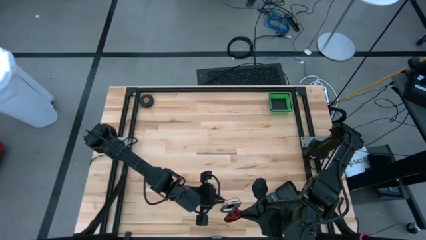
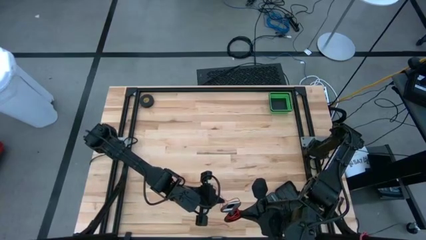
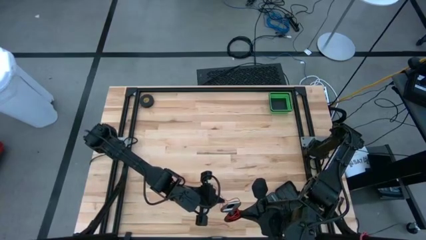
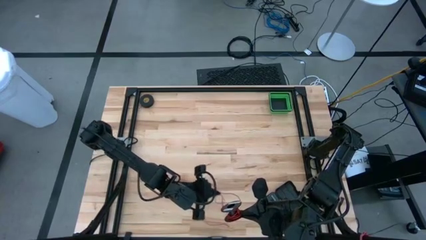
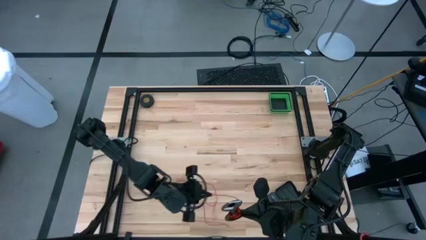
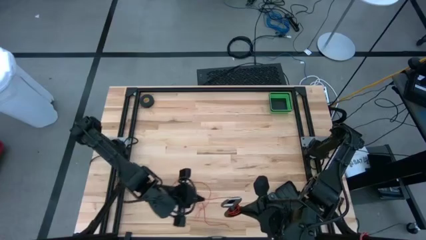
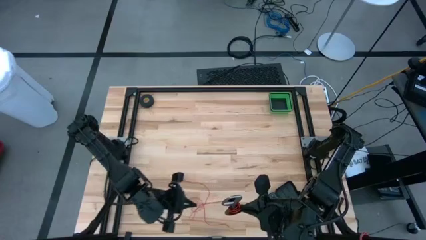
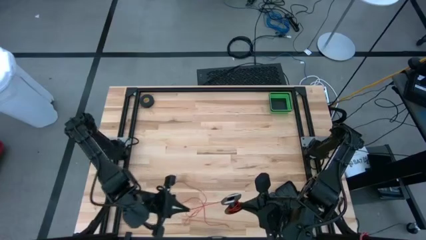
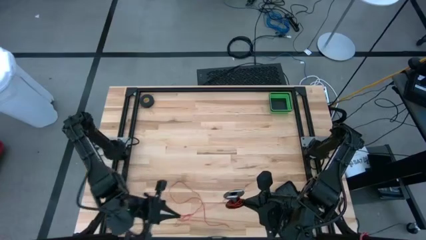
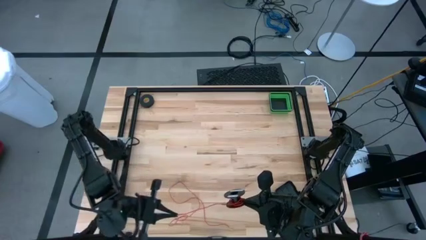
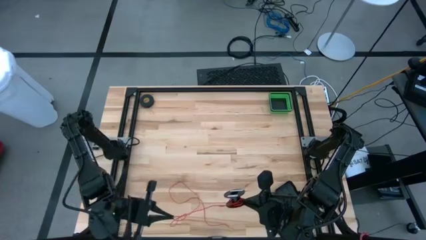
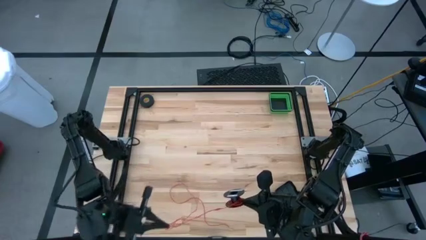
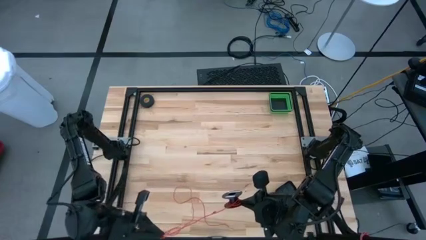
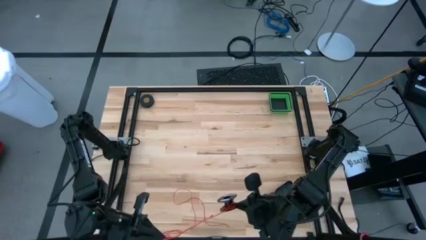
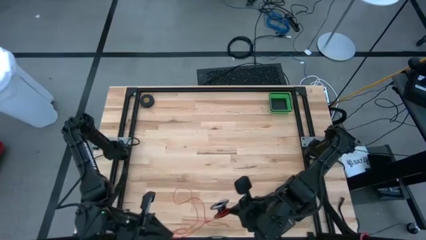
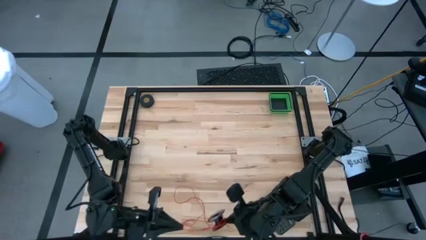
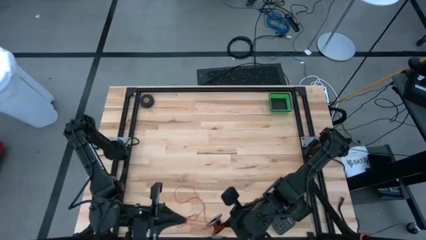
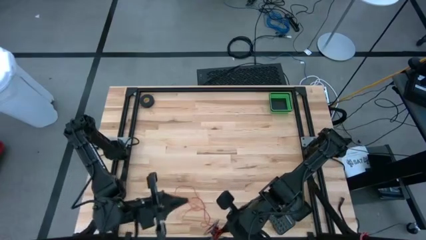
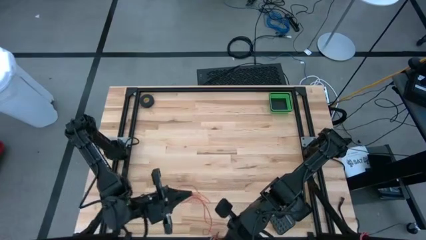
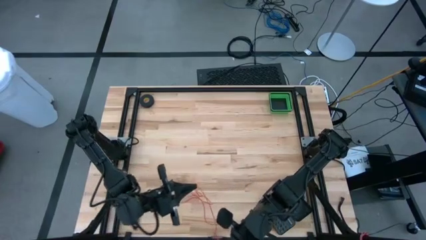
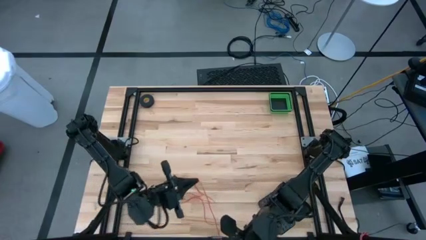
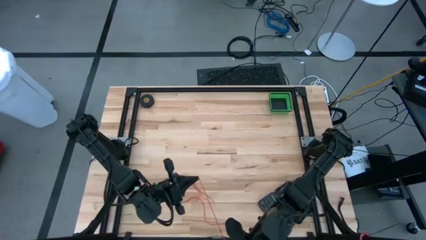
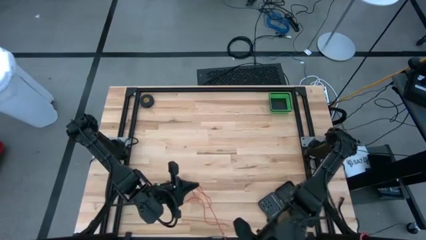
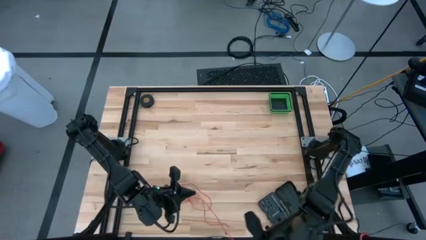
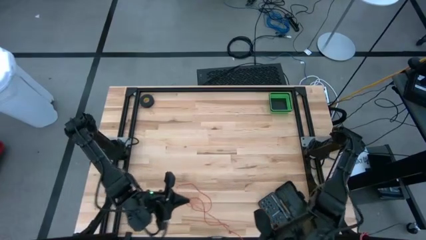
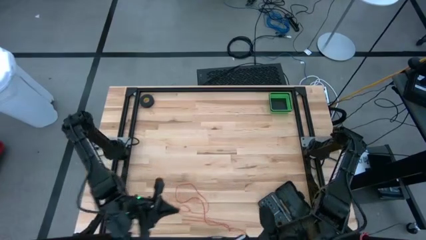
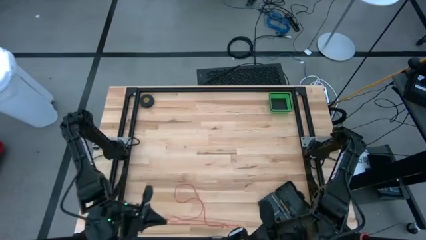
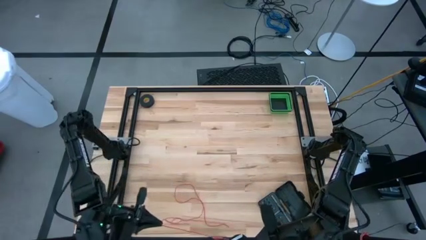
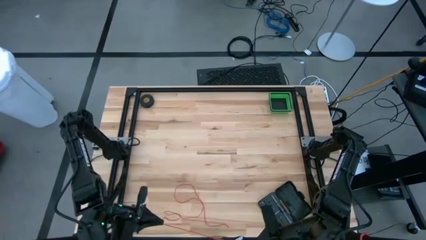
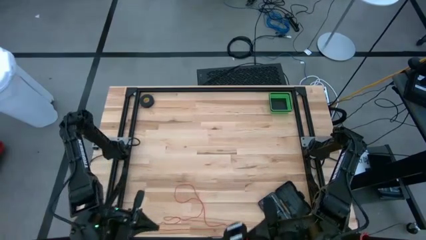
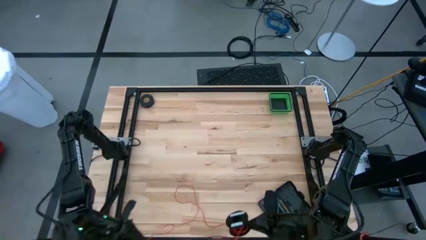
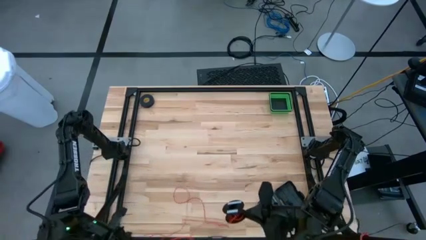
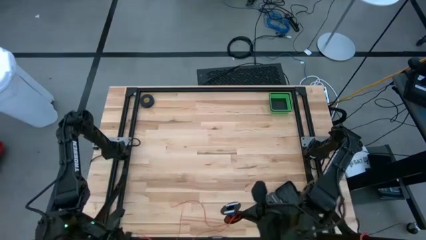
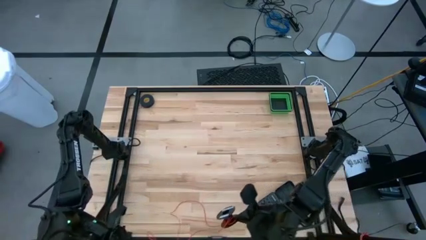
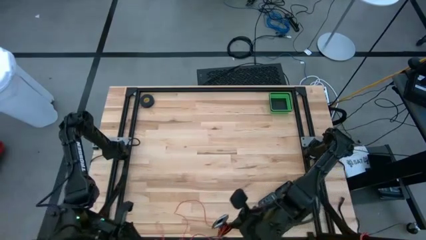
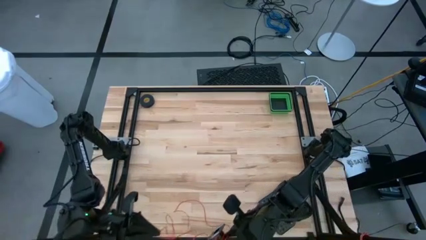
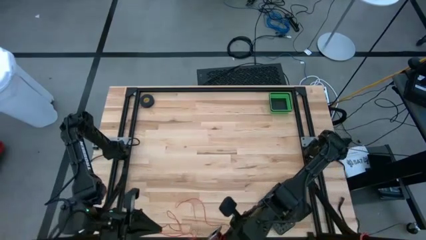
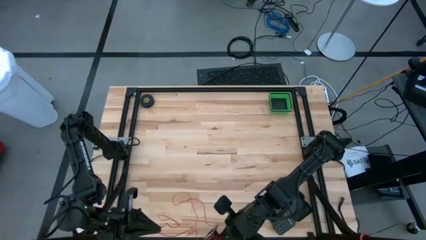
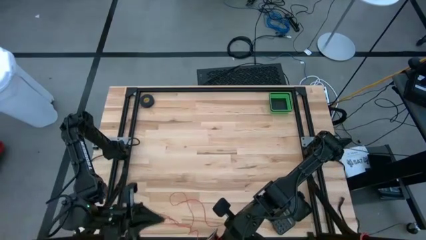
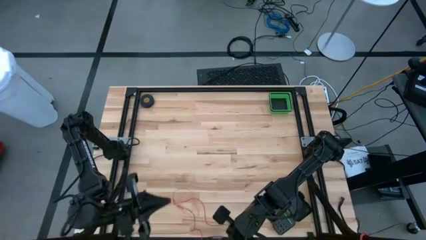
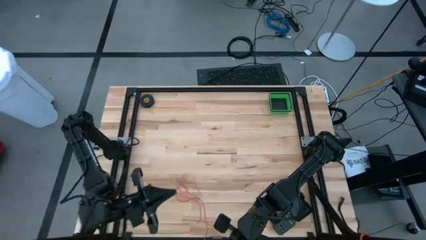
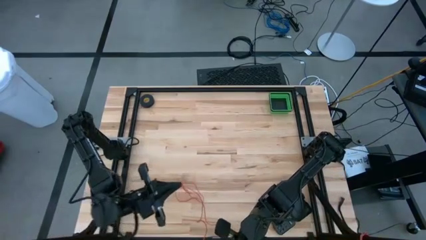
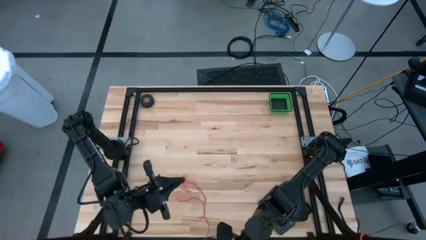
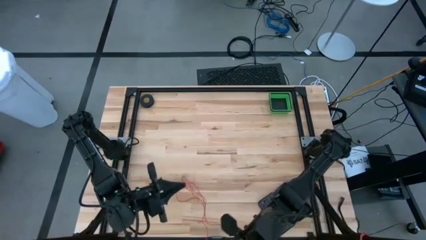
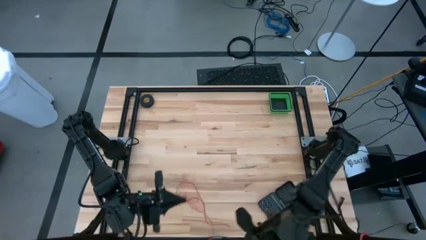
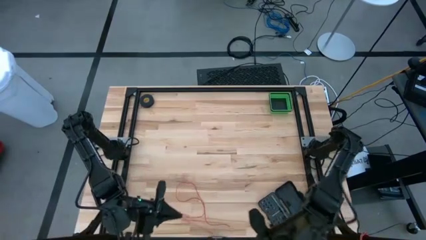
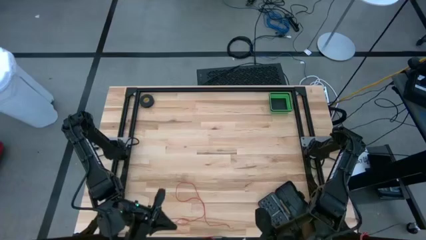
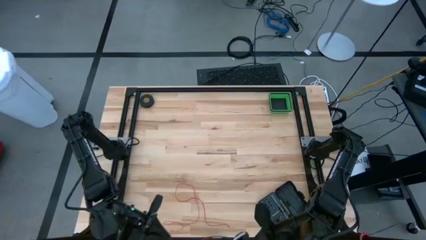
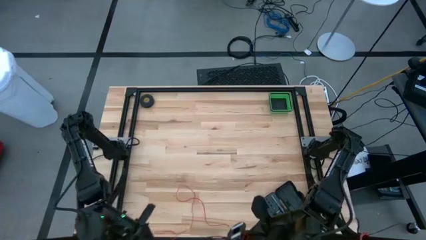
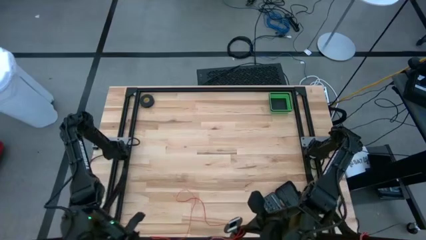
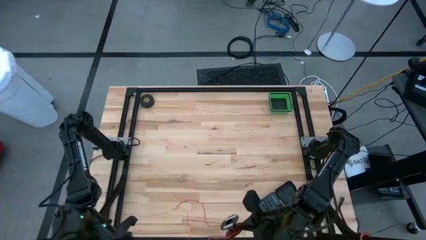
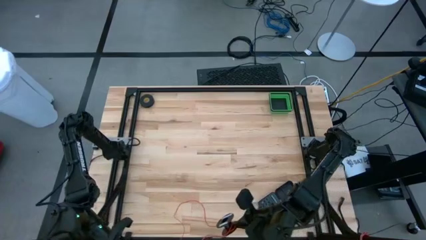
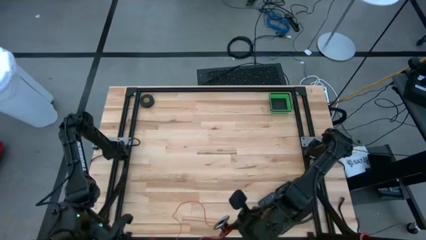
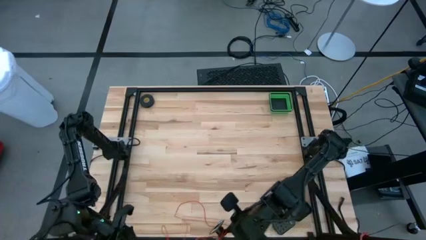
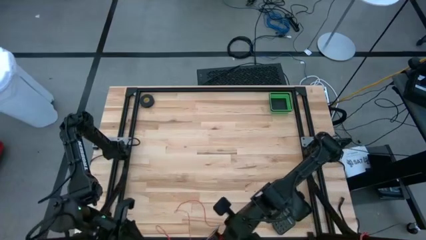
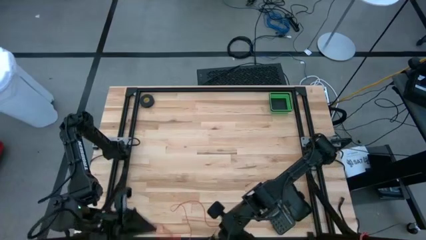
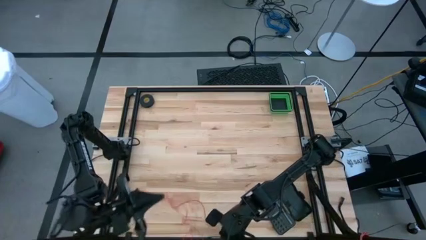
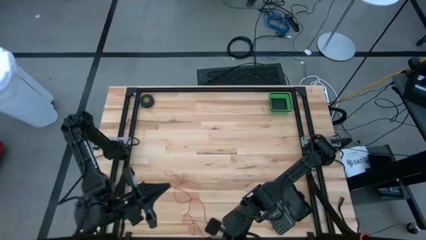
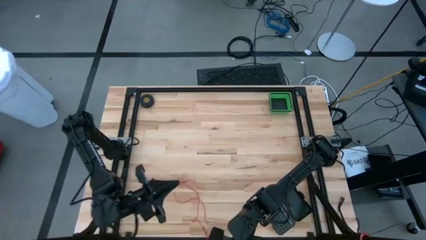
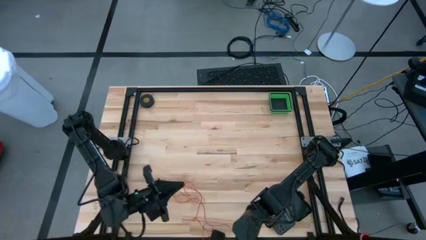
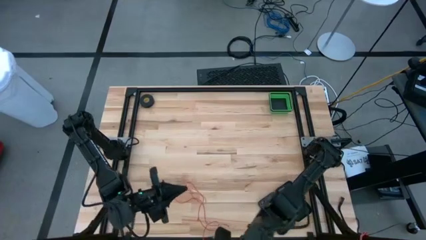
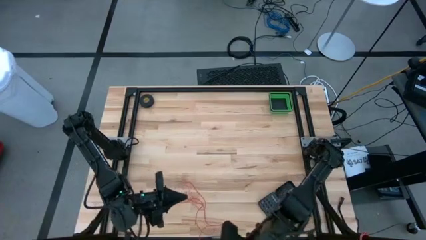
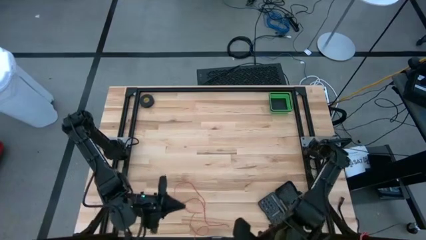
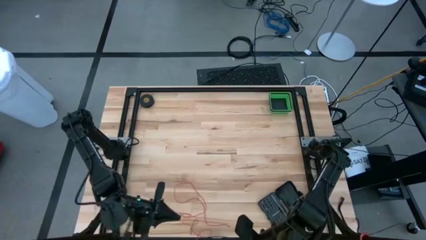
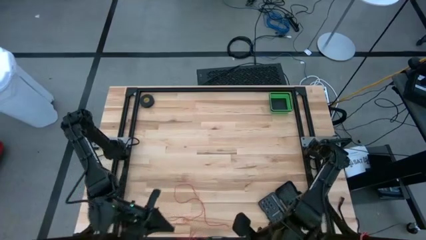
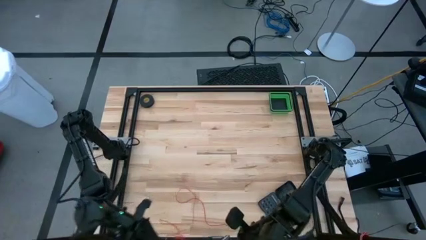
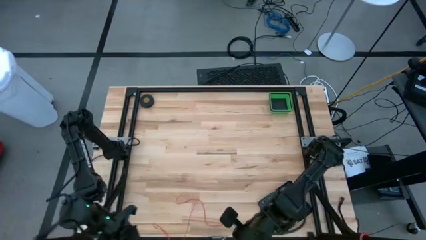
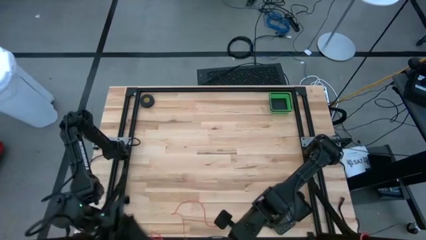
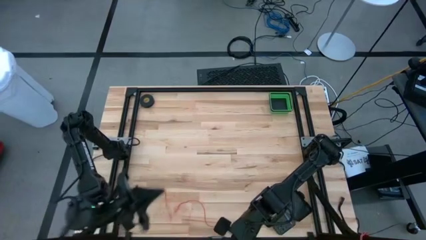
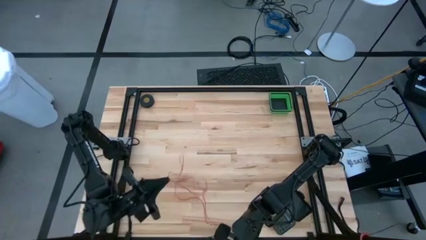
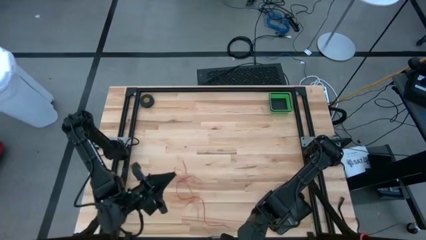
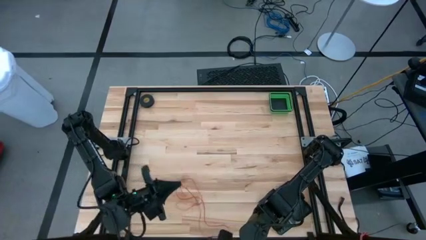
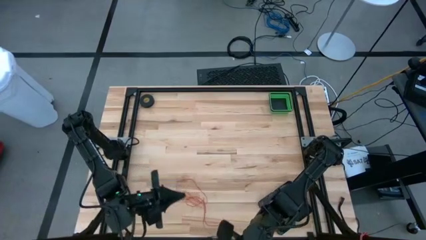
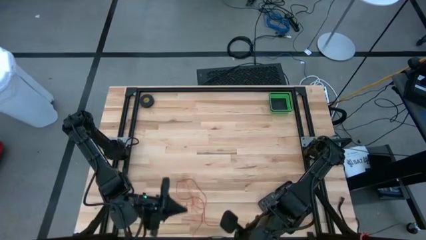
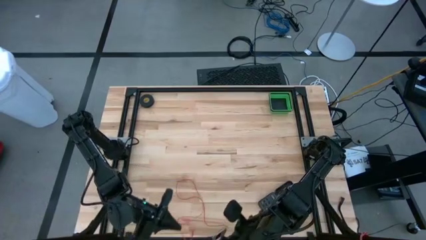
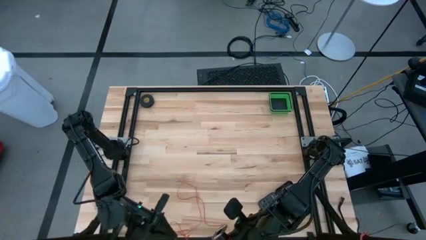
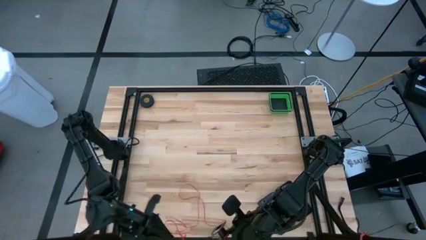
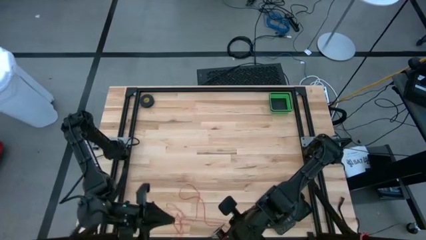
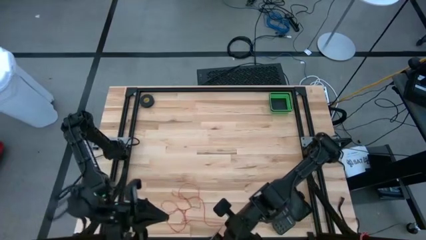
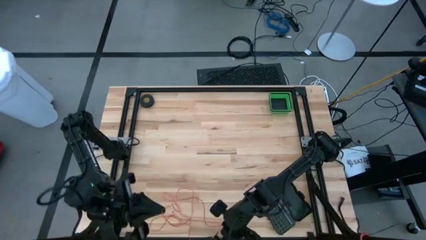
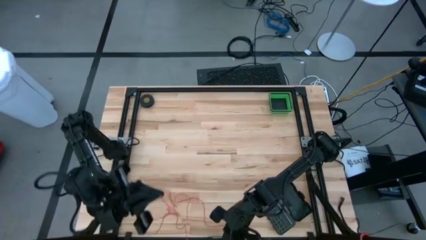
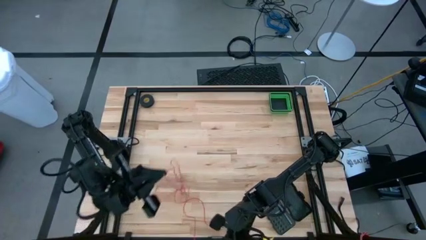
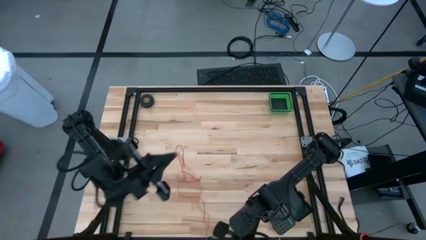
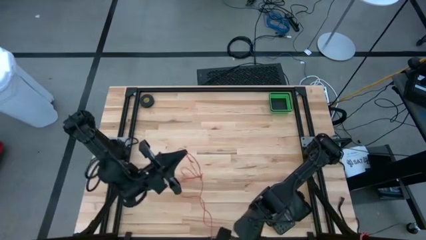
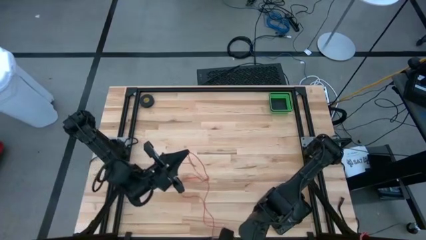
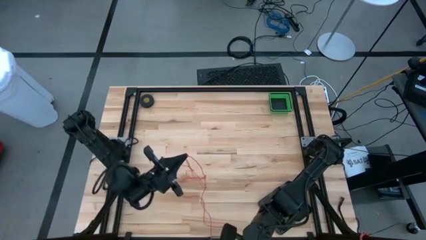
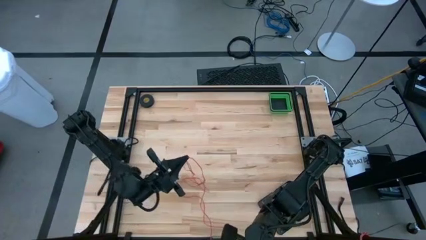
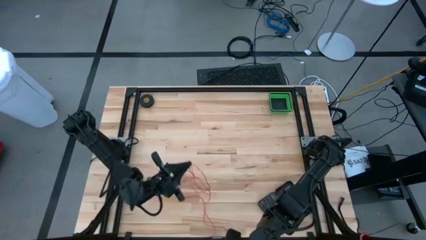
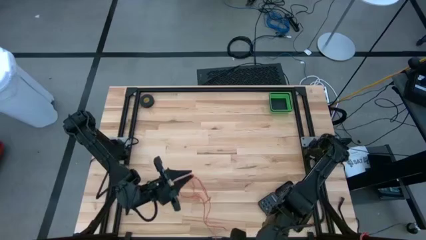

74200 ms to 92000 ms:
Task: Coil cords
Uncoil the red wire on the black spool
